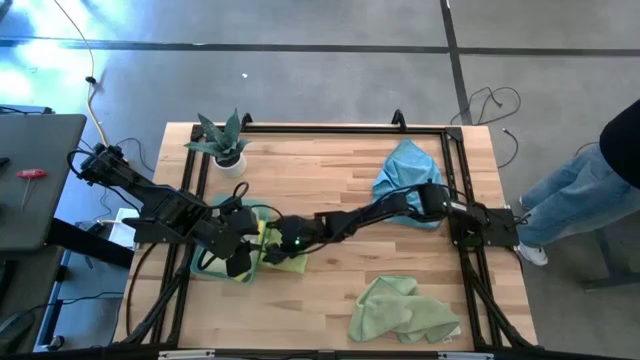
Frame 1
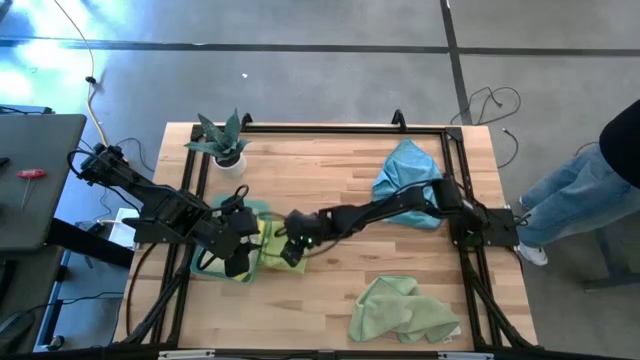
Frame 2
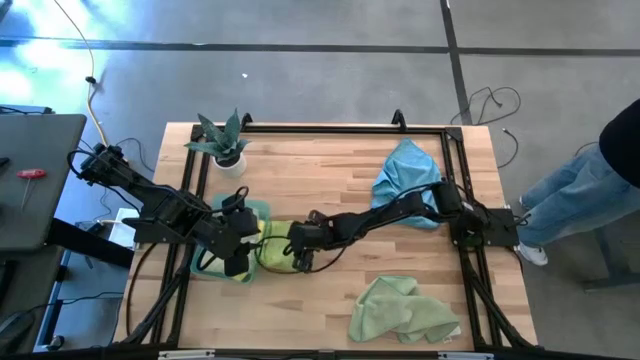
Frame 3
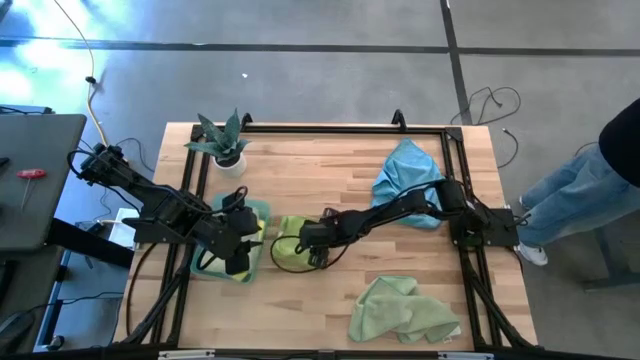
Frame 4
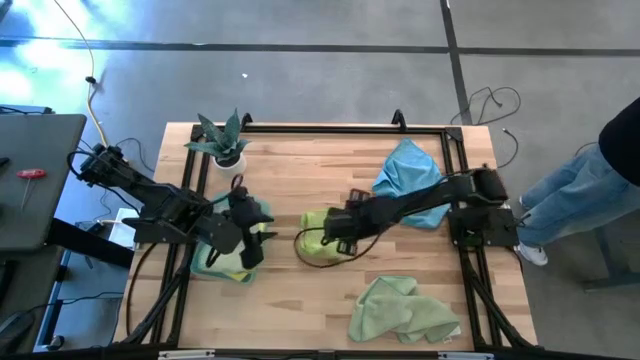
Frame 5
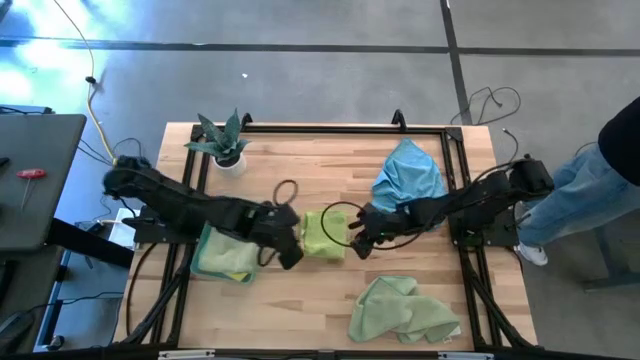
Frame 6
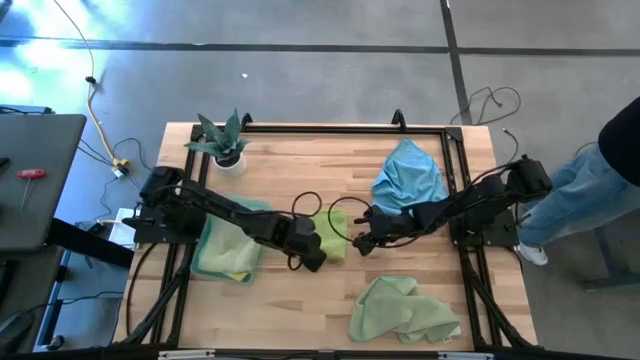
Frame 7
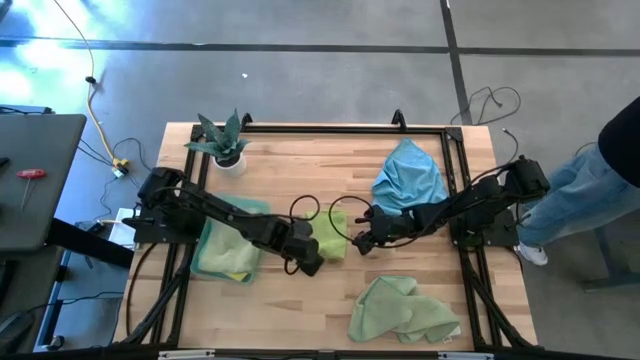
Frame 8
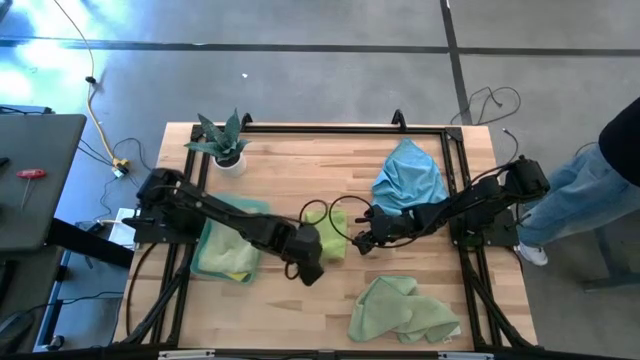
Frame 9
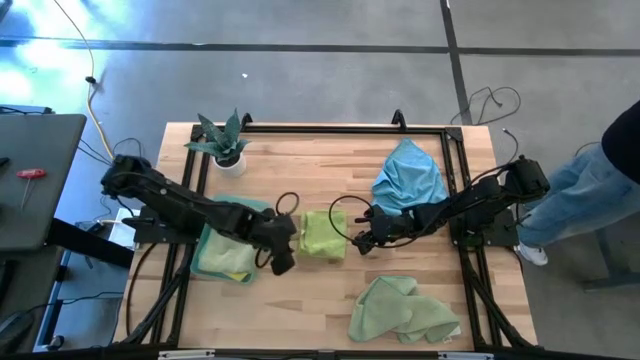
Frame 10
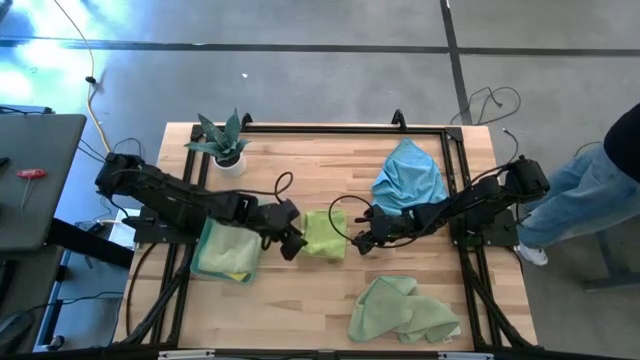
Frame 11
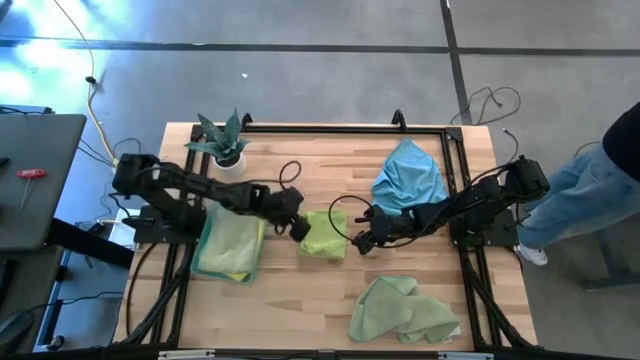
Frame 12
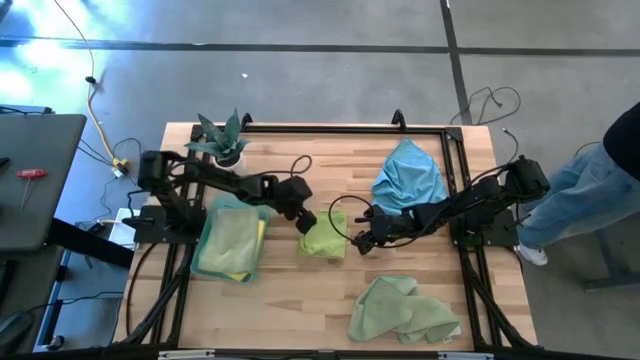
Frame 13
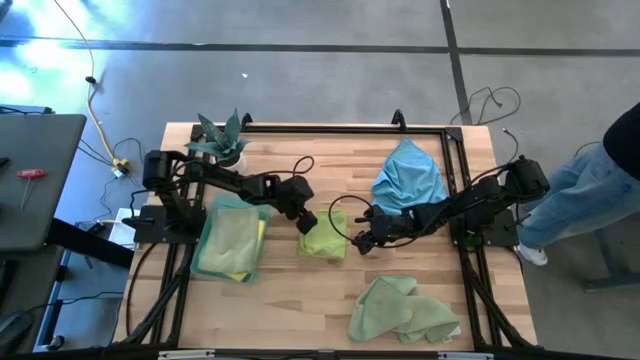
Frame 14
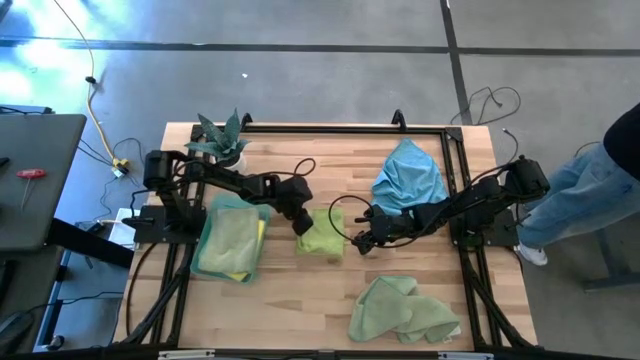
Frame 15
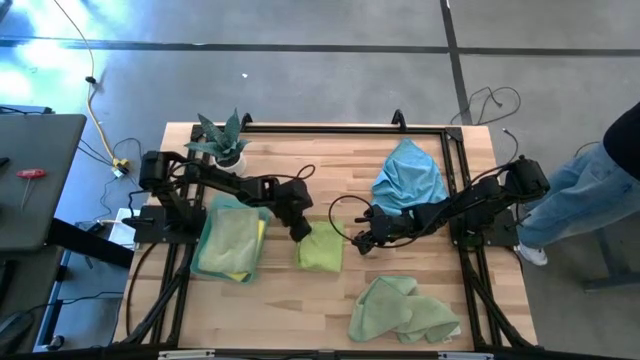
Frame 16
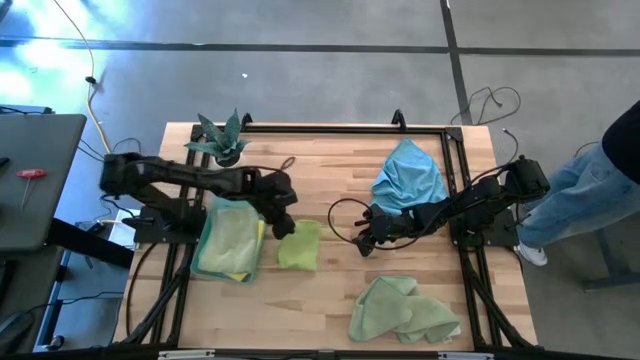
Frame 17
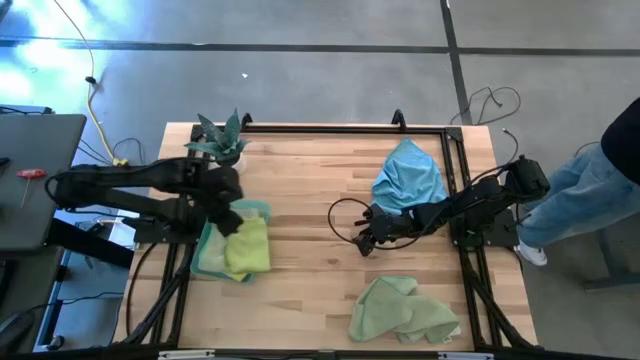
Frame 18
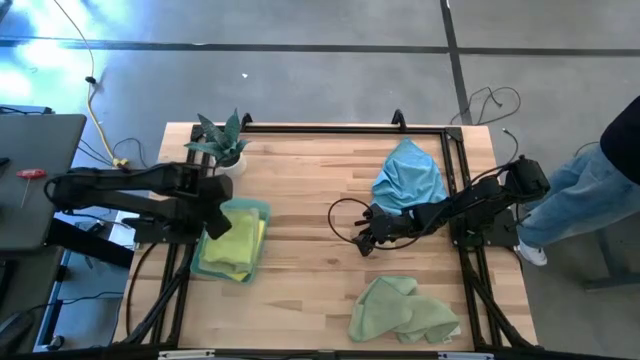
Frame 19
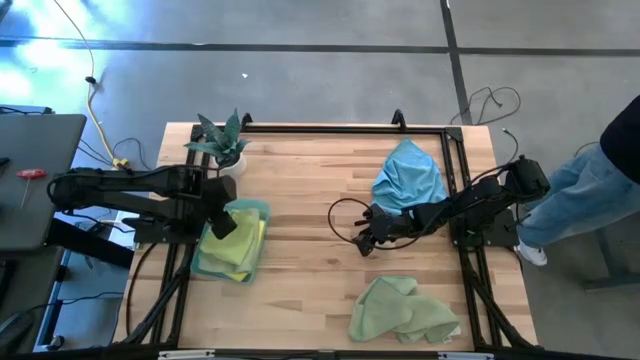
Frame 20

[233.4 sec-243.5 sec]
Task: Fold microfiber towels
Put the light green microfiber towel into the green bin

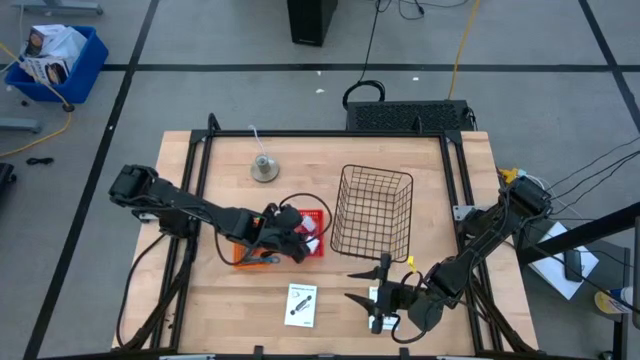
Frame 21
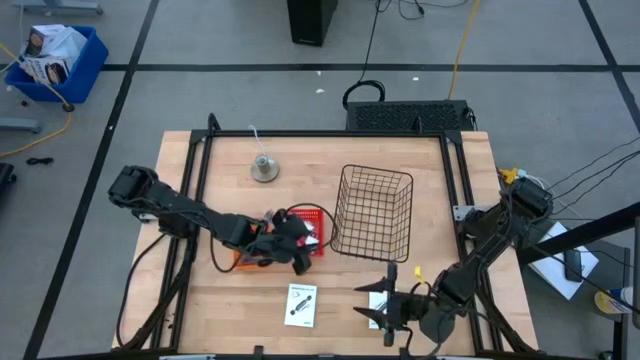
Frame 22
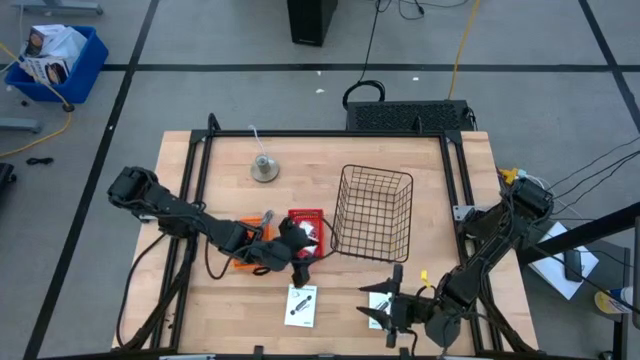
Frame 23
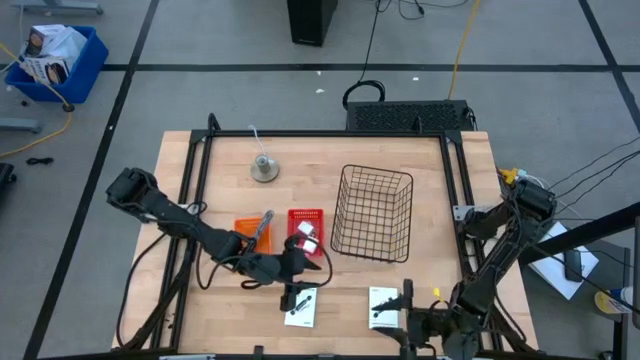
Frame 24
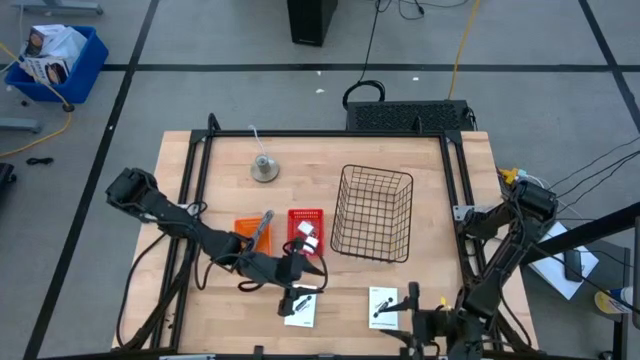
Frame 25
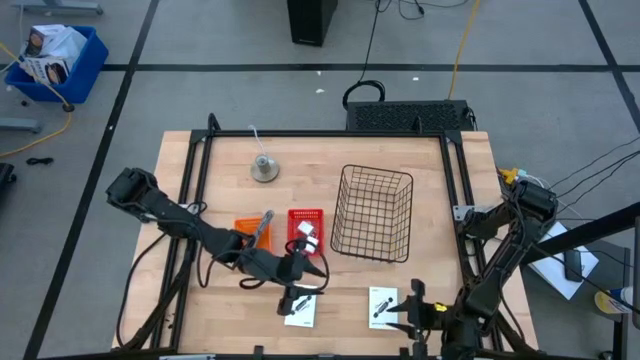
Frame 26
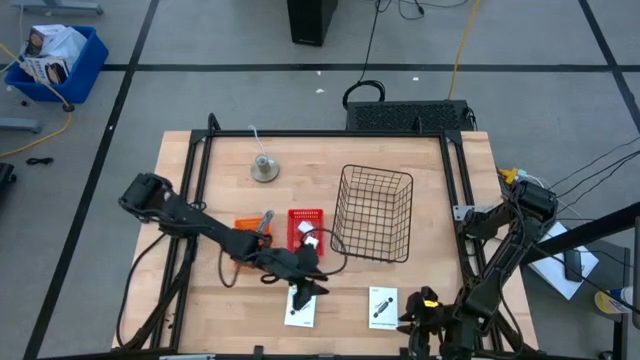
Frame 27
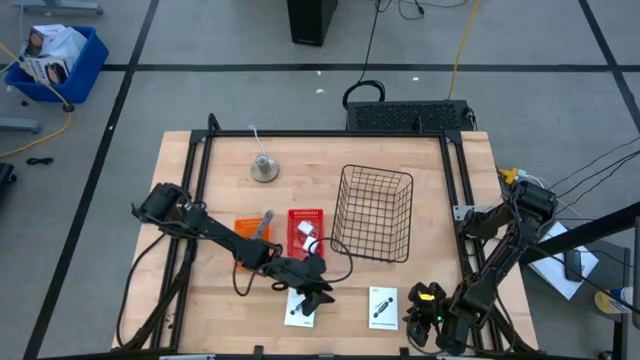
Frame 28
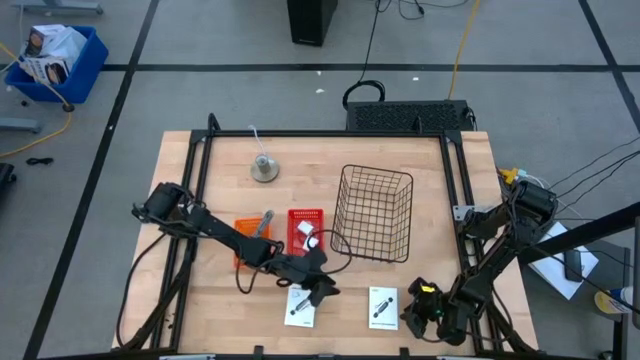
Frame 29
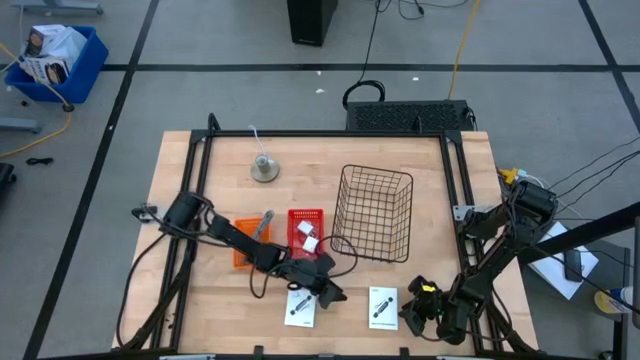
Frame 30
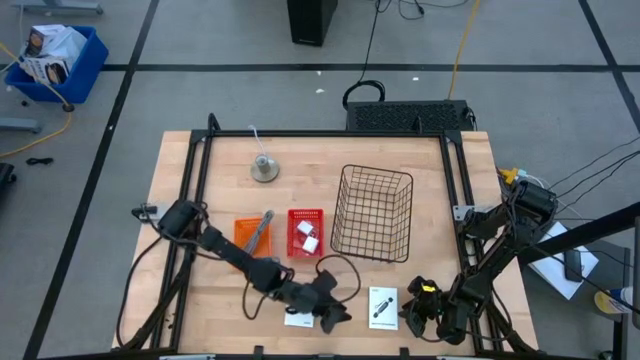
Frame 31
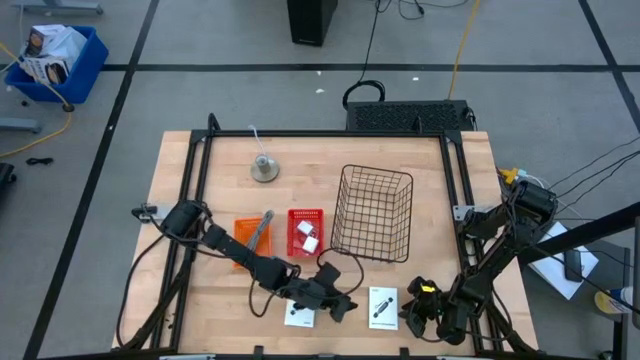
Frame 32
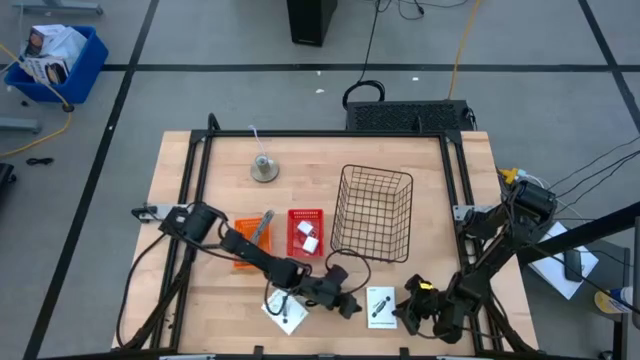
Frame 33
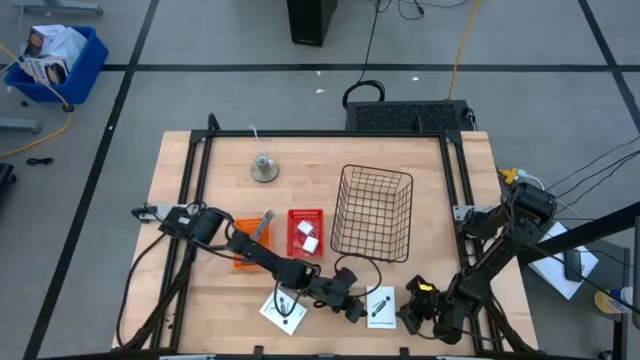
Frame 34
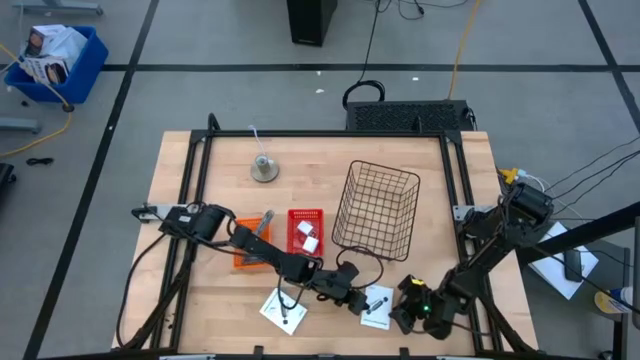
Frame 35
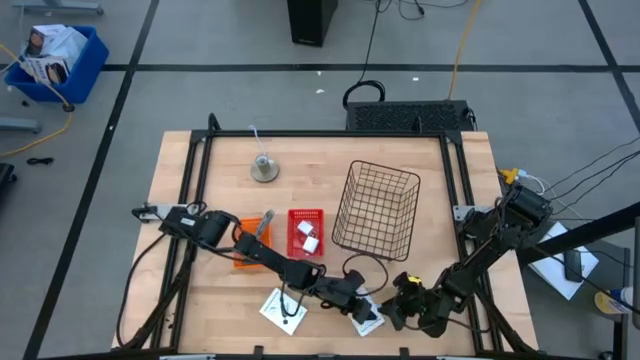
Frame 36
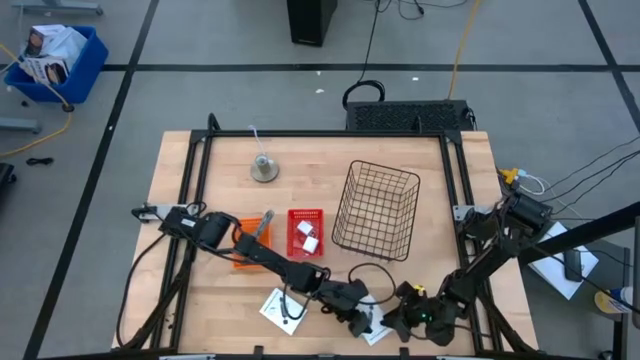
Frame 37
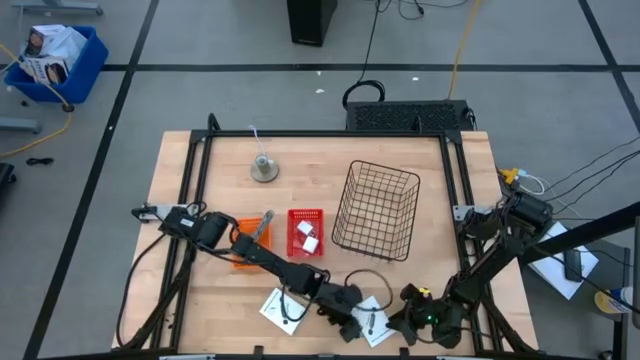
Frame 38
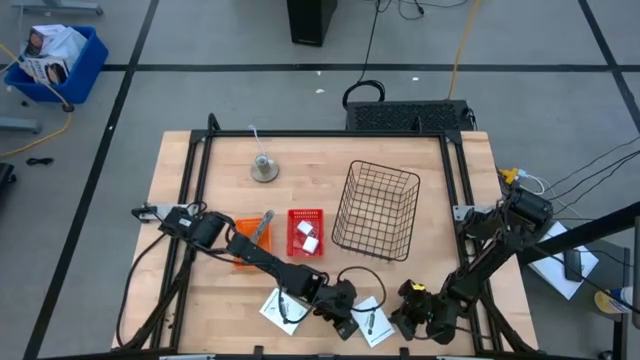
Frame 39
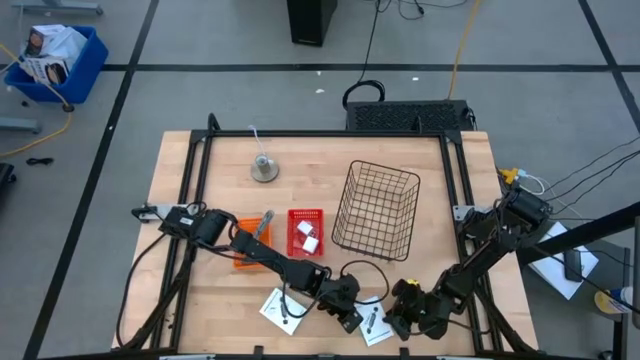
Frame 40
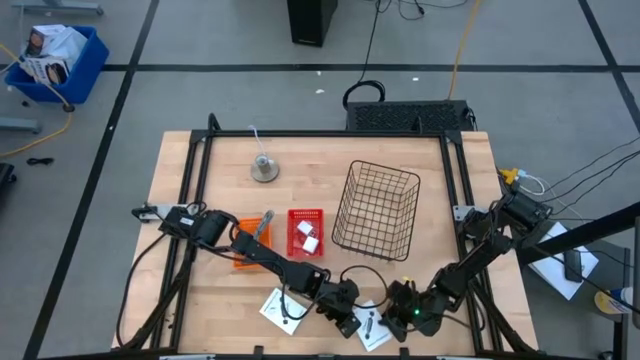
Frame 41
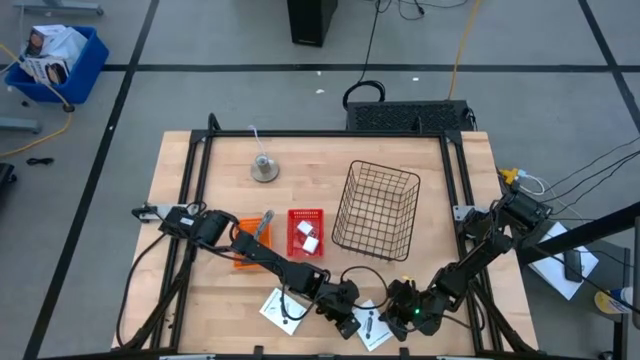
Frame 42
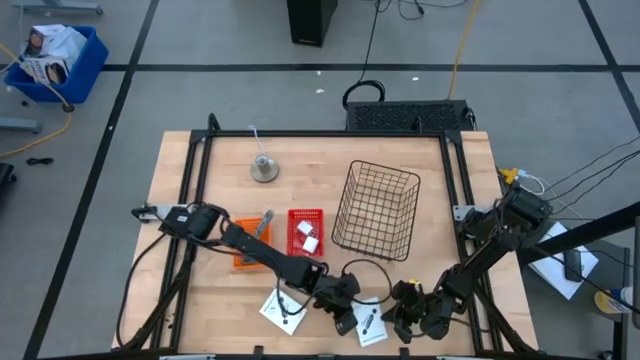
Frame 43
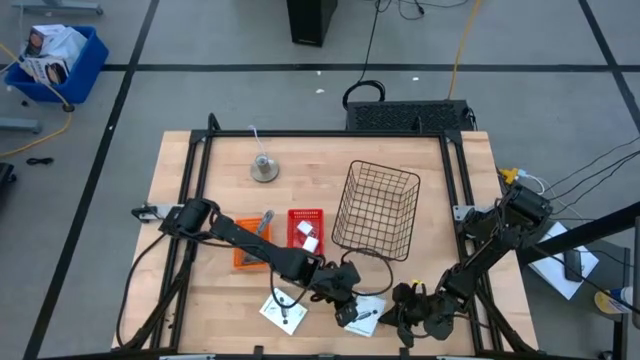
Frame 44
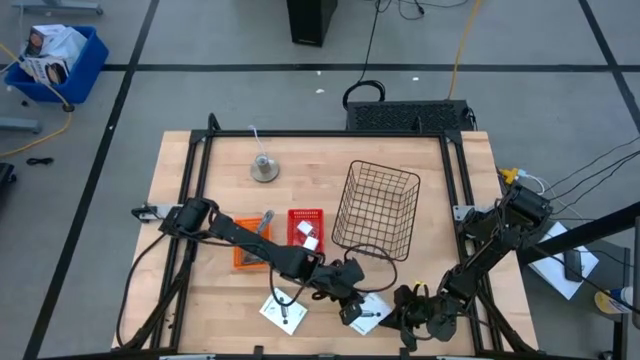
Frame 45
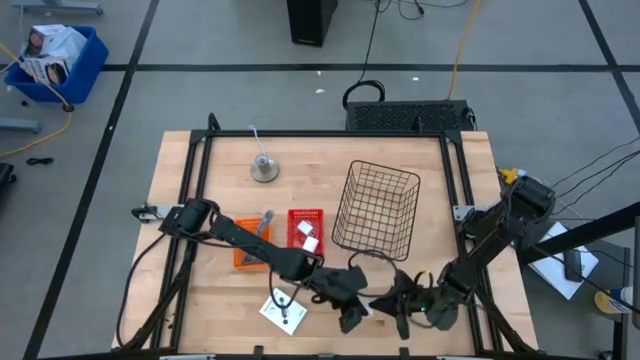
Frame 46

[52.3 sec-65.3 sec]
Task: Pick and place items into bin
Put the right card reader into the wire basket
